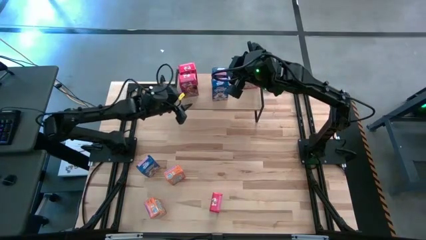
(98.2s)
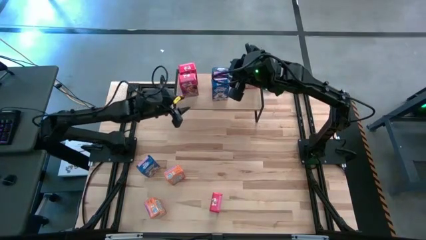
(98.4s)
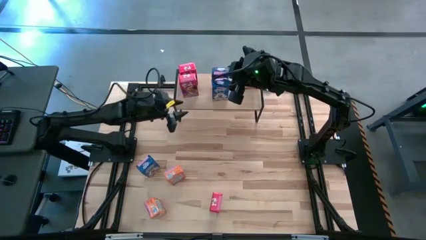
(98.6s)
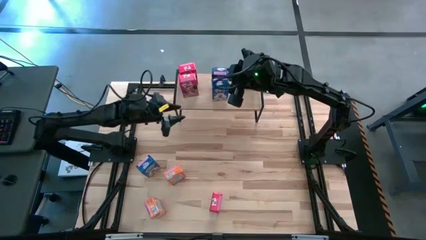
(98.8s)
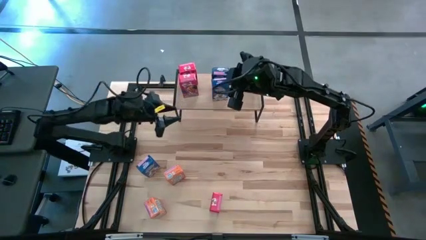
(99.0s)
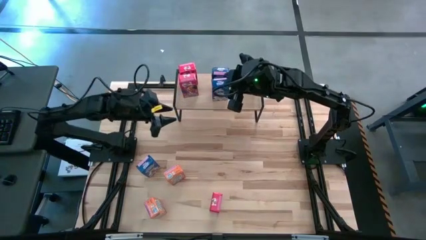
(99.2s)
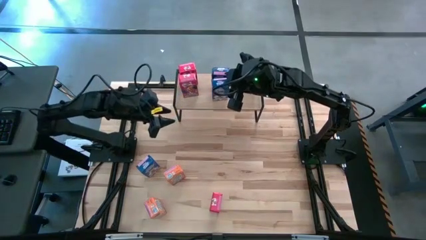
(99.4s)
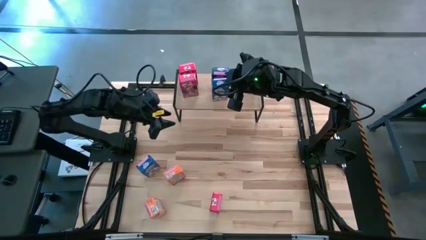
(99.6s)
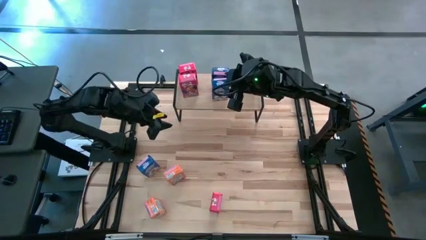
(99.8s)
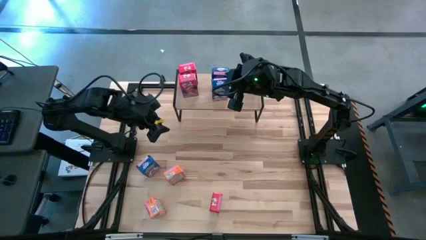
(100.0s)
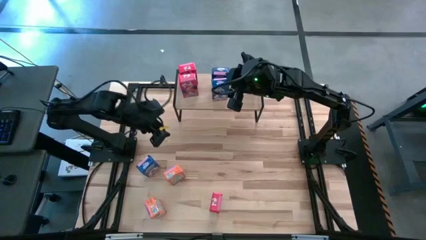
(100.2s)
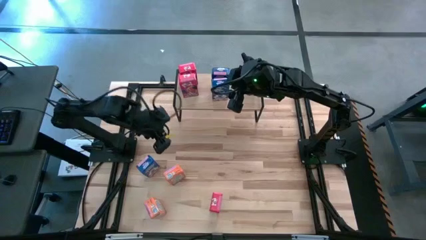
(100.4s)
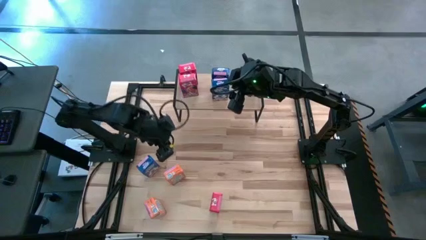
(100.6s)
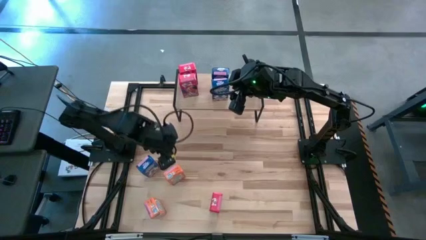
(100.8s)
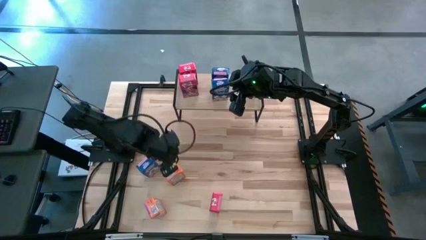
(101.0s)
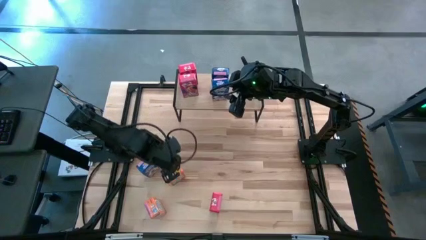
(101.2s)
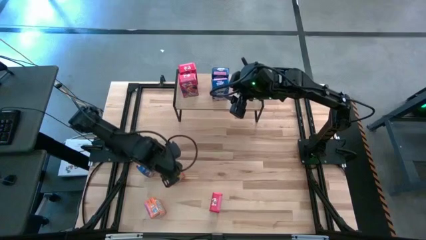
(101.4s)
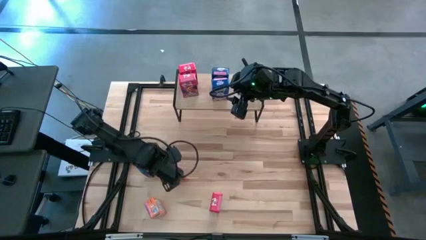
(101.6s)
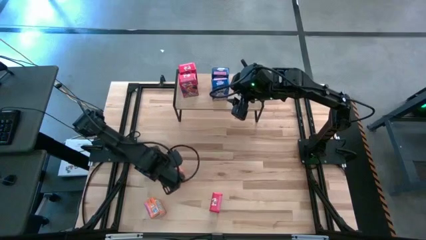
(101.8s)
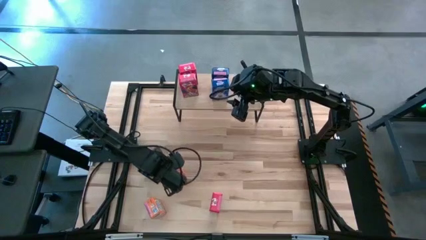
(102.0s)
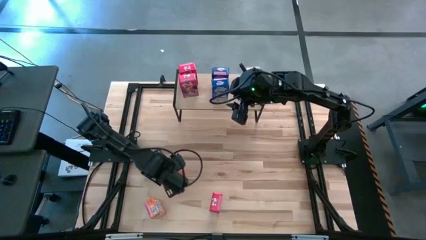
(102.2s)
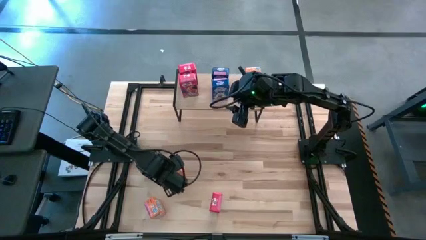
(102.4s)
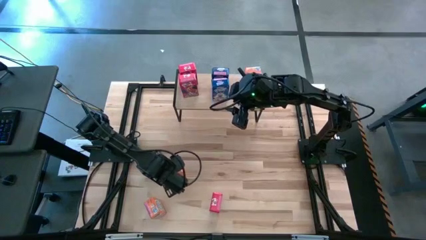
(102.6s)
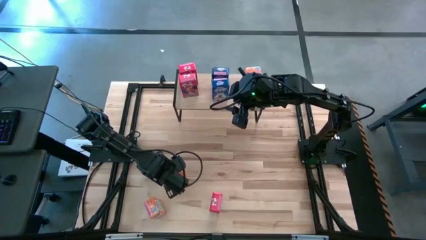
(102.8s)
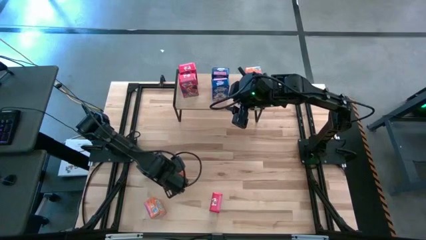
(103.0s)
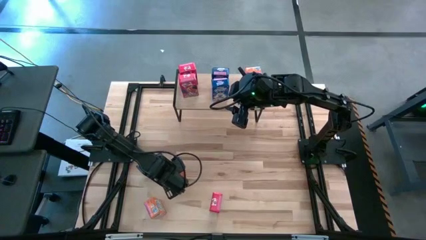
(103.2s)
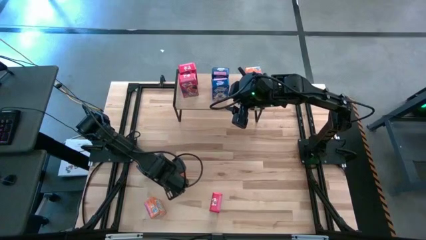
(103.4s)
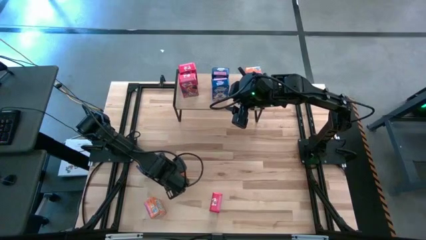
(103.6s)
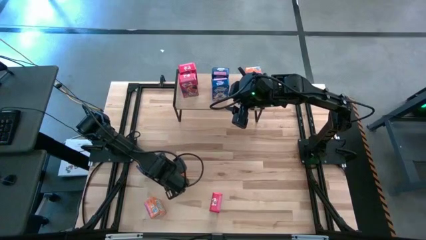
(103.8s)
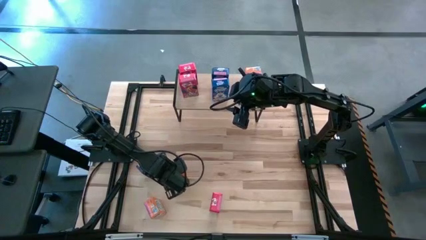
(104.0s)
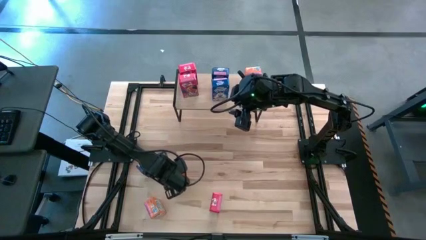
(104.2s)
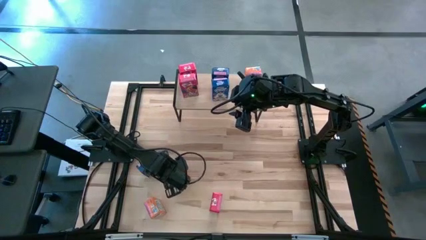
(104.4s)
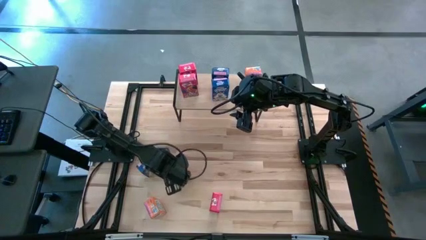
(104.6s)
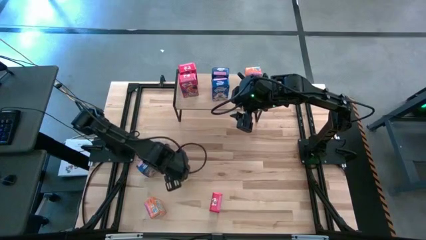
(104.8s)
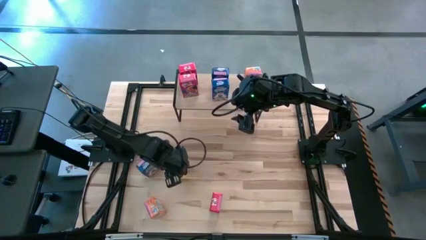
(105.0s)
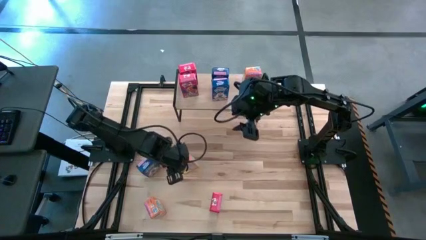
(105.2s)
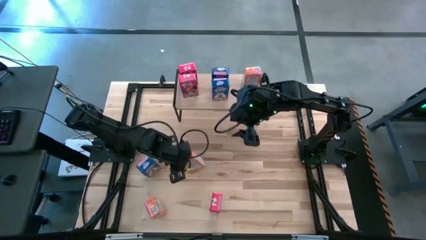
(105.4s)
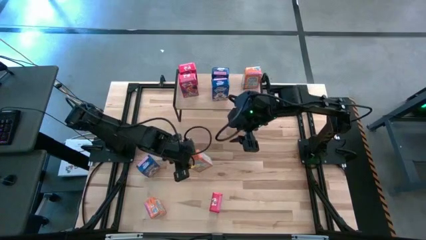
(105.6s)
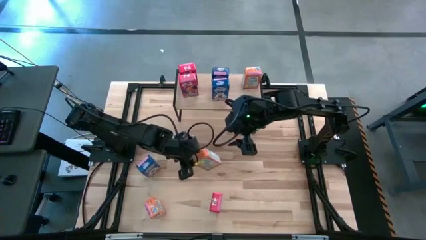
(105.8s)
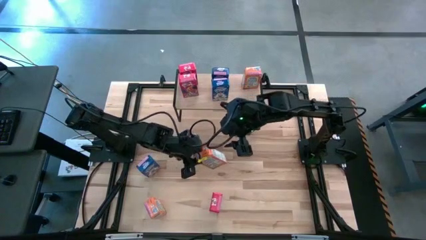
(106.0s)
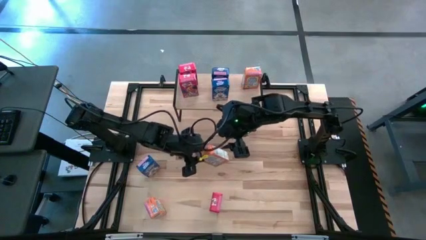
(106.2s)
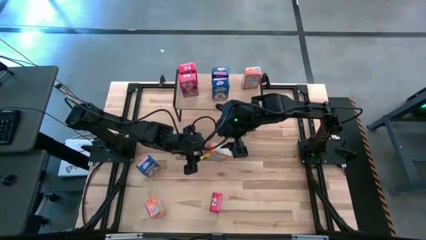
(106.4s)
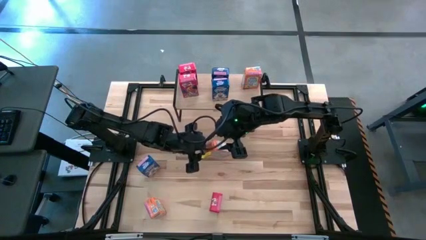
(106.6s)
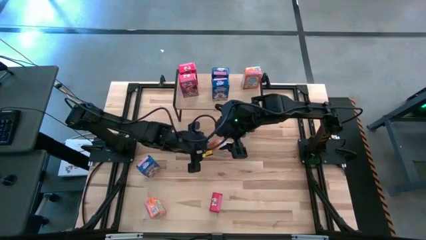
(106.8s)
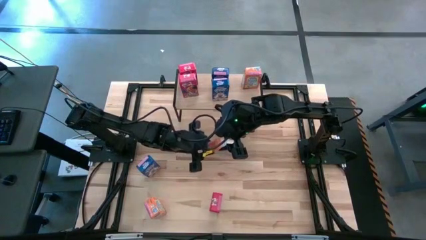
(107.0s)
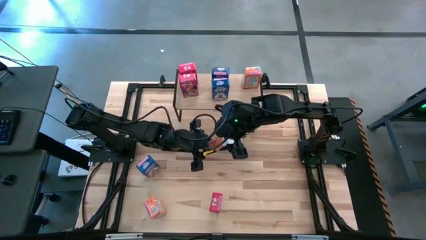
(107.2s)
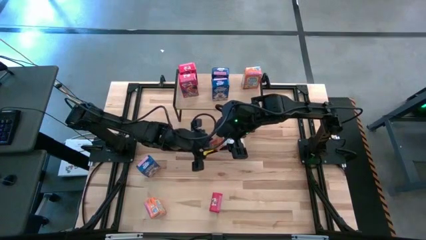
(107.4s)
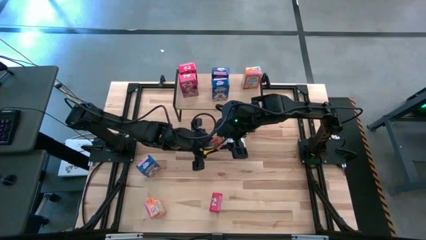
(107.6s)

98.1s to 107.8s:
Task: Stack cereal on shelf
Put the top orange cereal box on the shelf aligned with the other orange cereal box

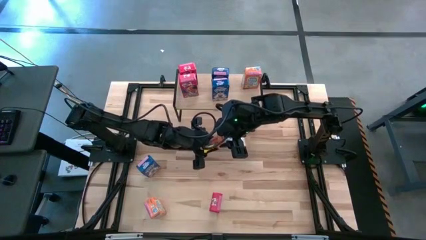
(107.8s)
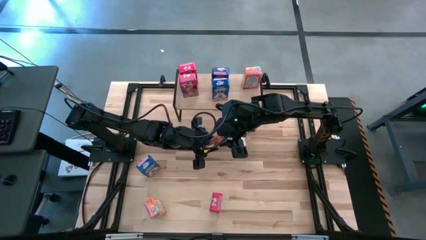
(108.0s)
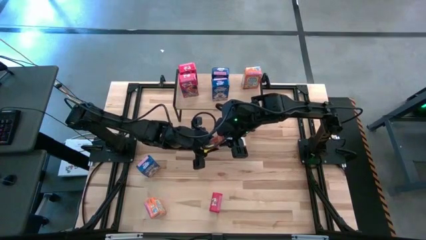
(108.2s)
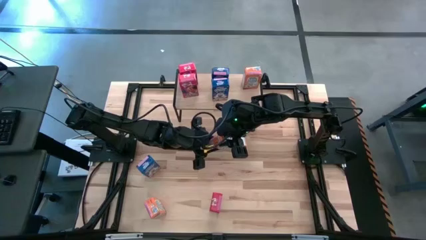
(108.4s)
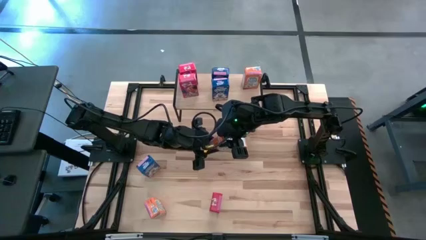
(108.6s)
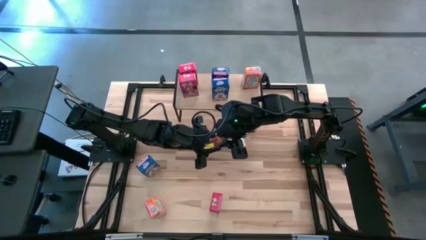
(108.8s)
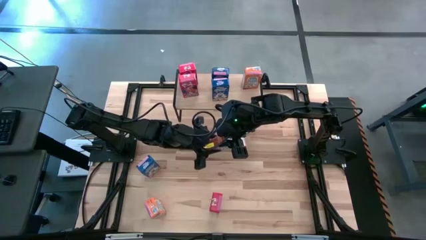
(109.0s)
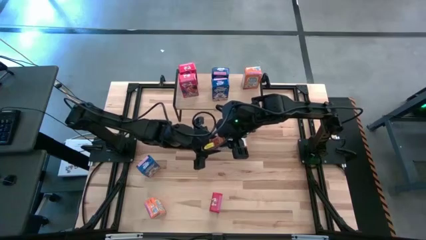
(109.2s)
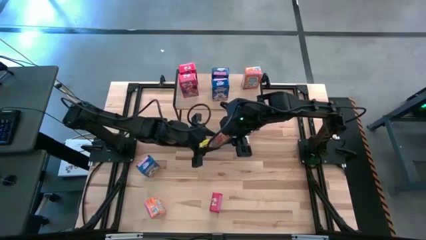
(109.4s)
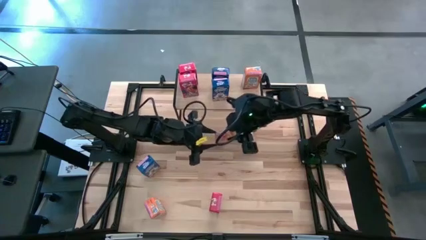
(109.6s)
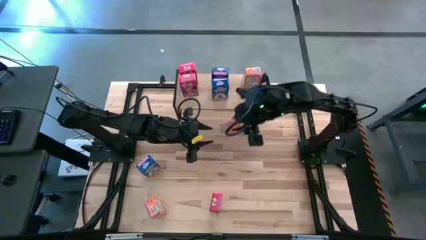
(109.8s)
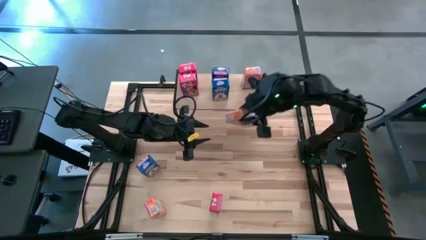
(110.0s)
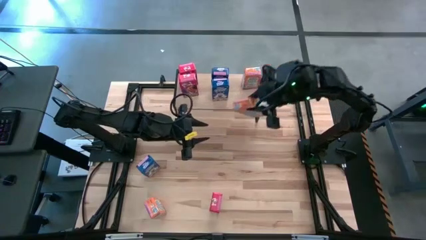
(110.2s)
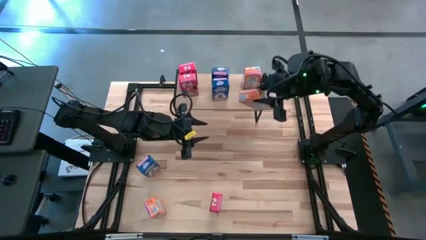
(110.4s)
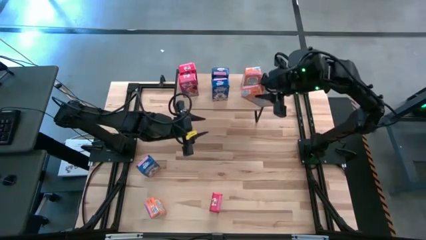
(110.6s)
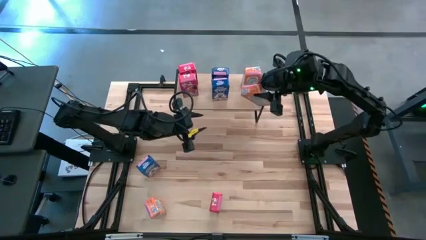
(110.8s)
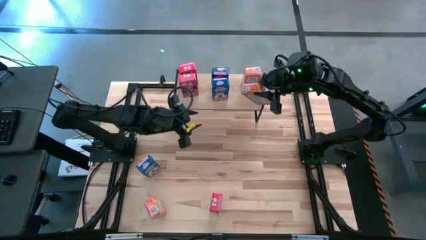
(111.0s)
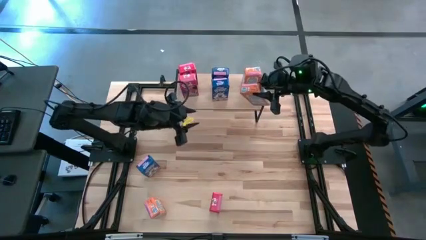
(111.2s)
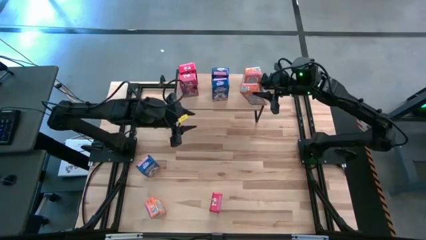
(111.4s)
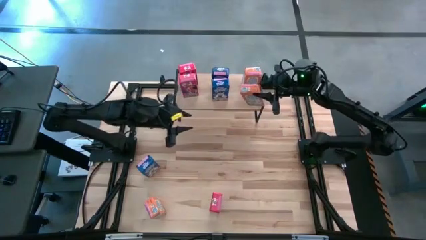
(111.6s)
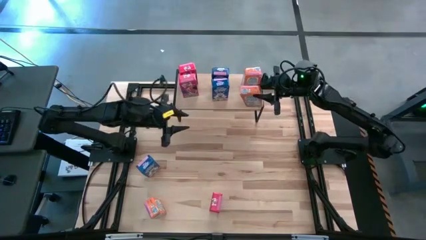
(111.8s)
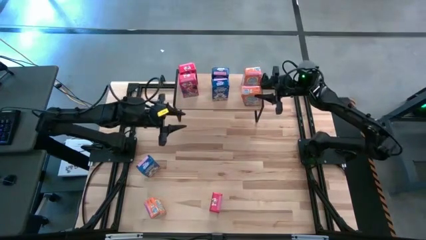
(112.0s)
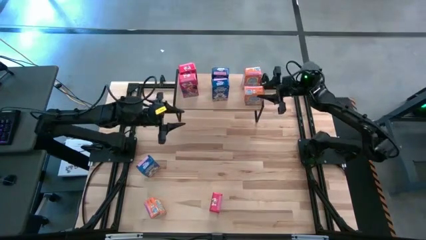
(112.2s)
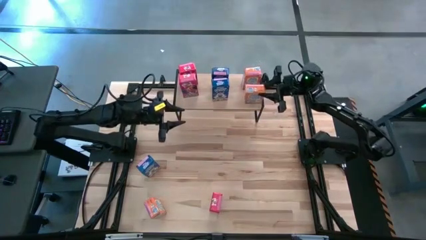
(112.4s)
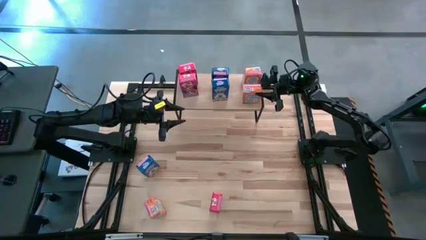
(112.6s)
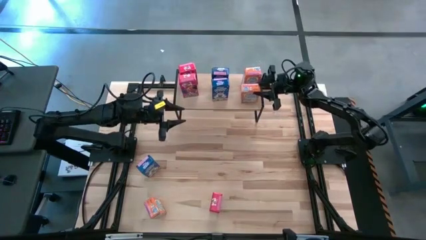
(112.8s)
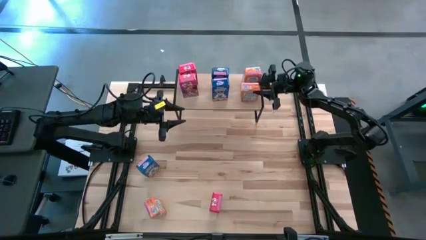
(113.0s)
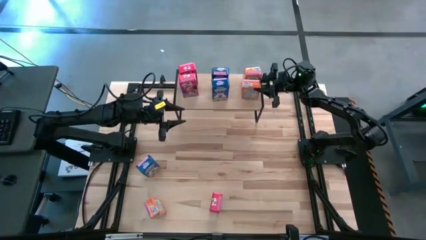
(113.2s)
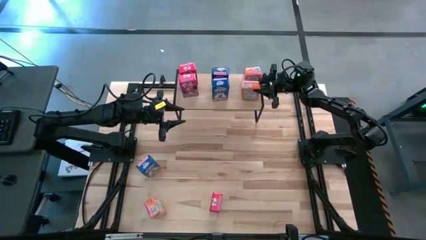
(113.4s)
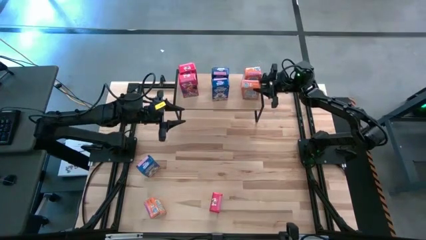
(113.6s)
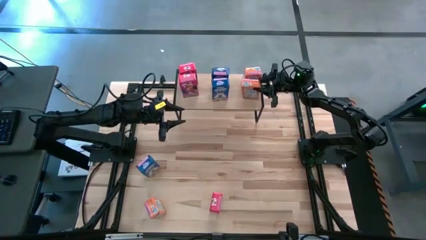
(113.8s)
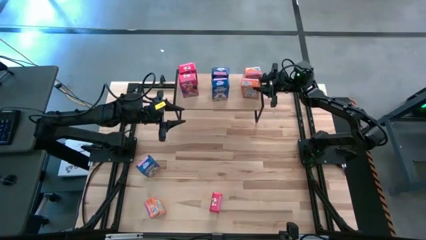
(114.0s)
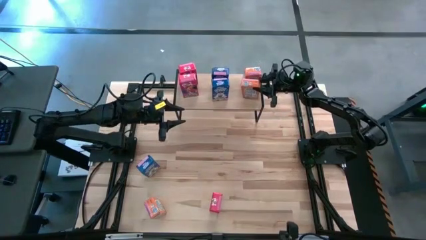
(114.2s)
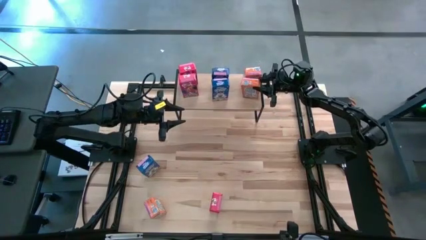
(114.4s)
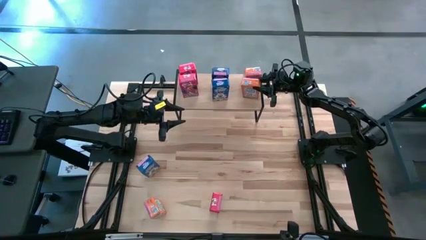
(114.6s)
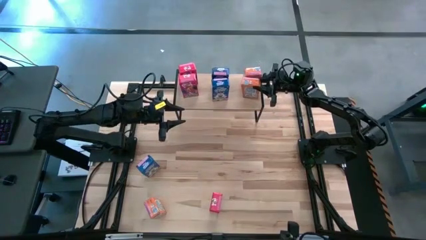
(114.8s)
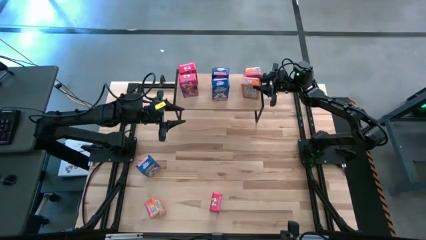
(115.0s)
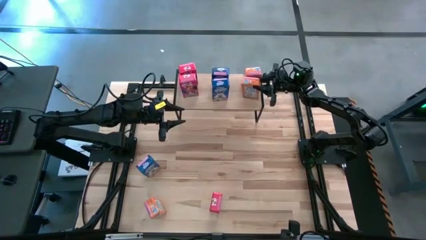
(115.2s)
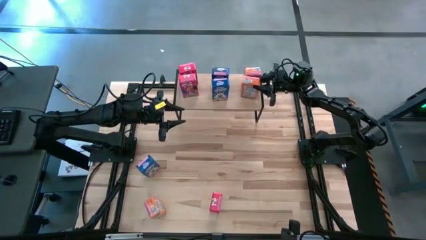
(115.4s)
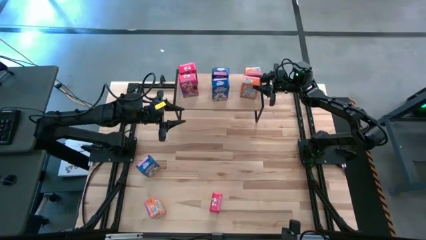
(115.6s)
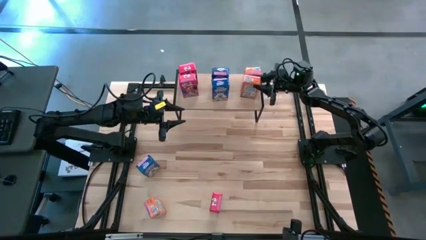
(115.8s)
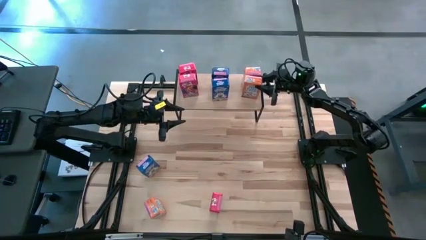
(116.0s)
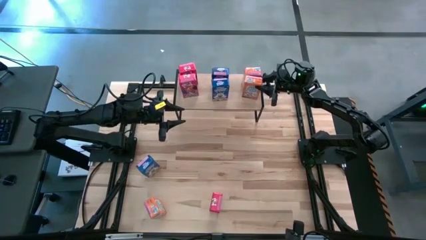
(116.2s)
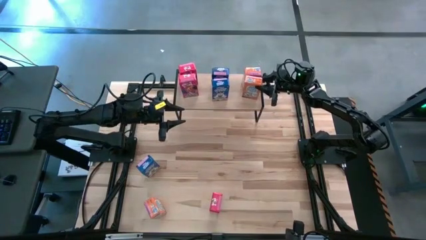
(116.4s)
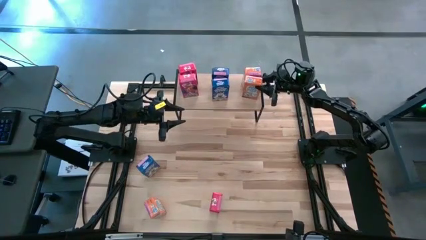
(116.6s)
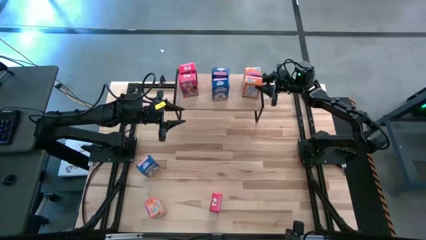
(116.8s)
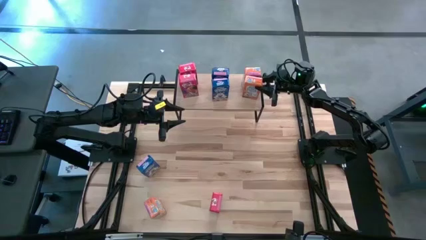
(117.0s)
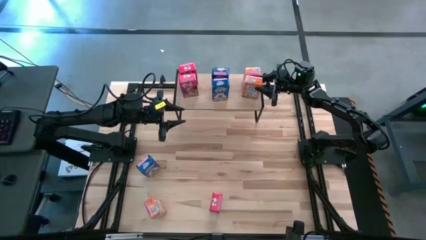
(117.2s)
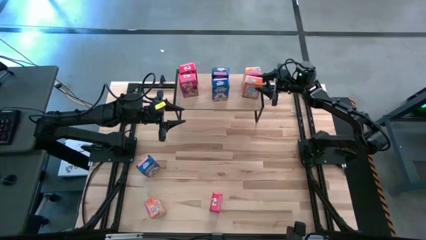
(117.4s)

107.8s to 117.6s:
Put the top orange cereal box on the shelf aligned with the other orange cereal box
